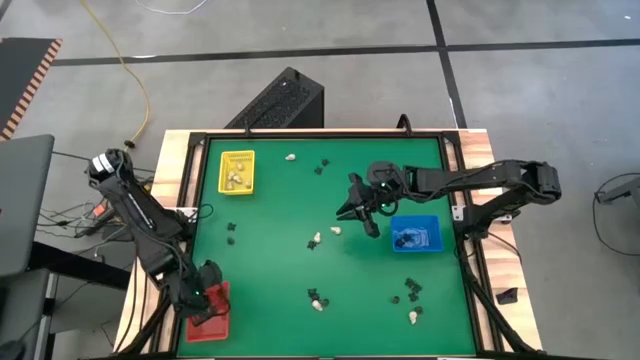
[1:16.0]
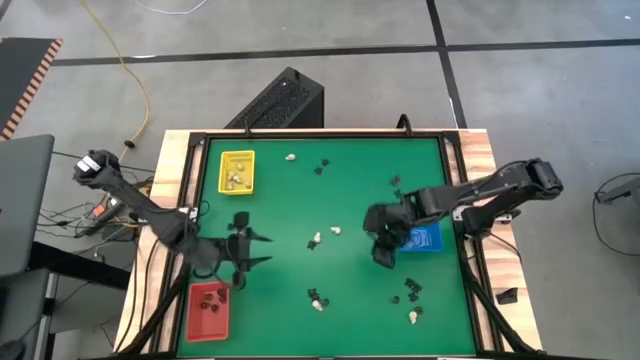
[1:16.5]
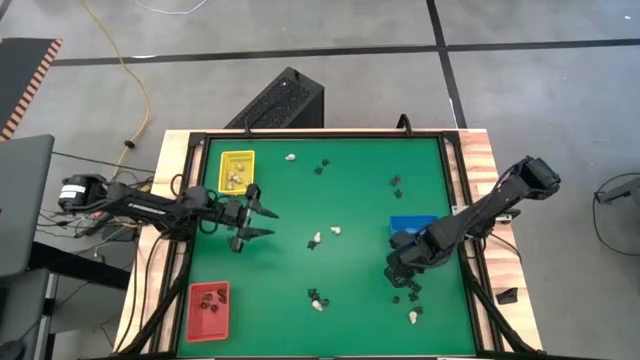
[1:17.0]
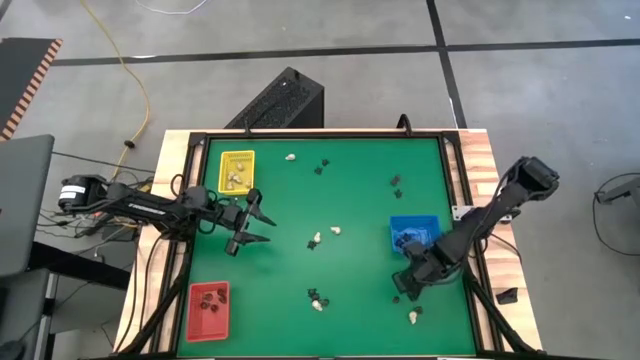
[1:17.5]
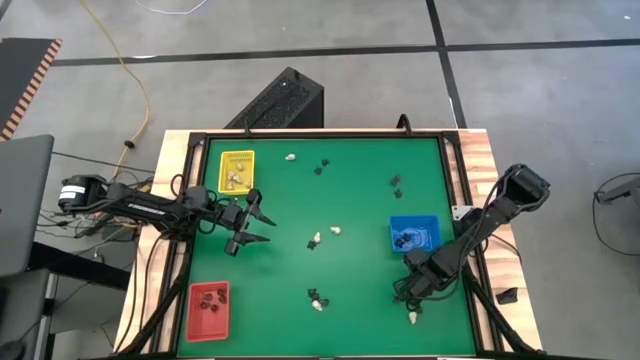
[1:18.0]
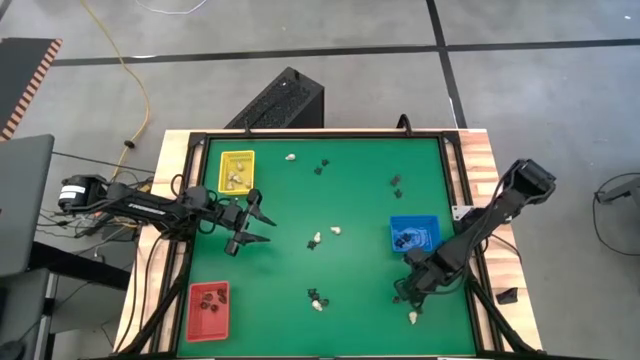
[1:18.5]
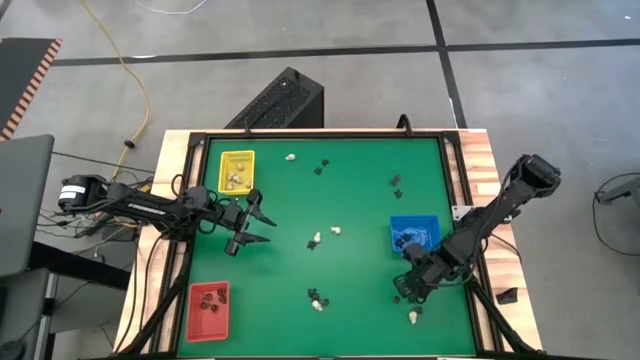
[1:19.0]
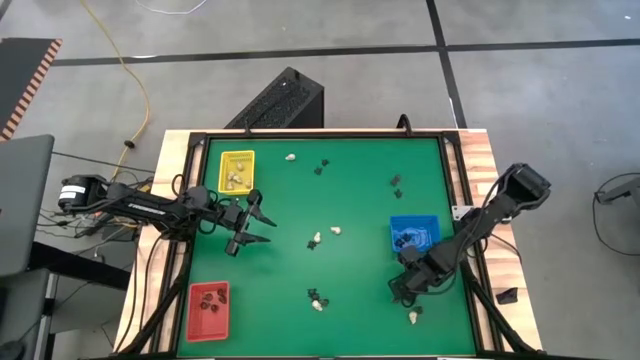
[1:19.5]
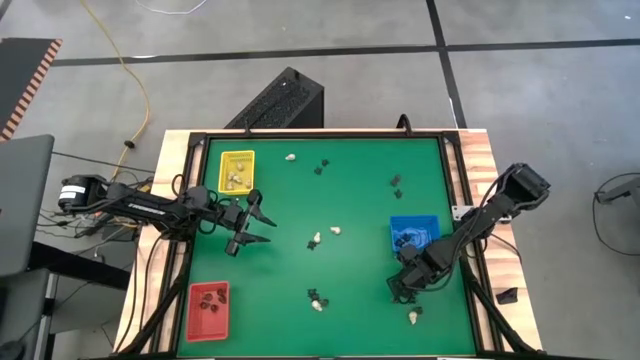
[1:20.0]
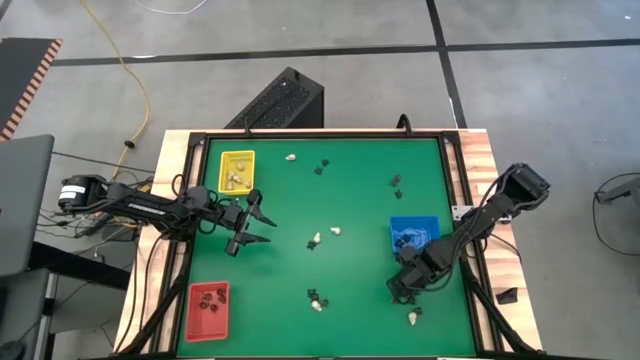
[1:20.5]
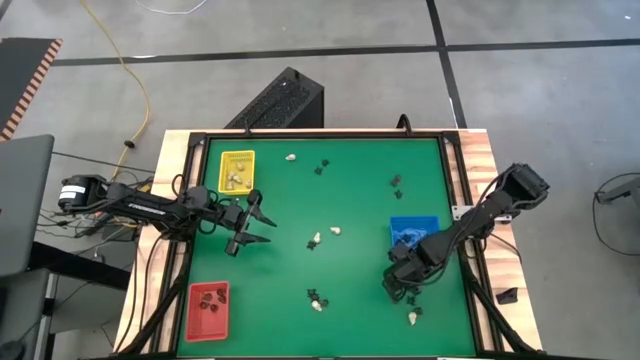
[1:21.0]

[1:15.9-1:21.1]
Task: Sort Halloween decoration
Put the black spider toy into the blue bin

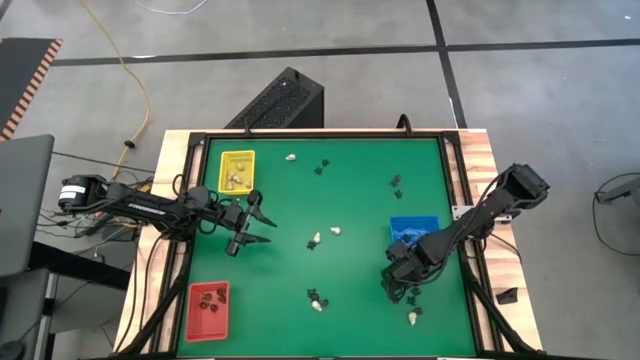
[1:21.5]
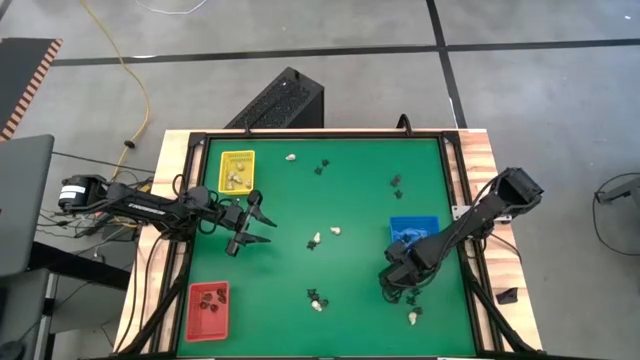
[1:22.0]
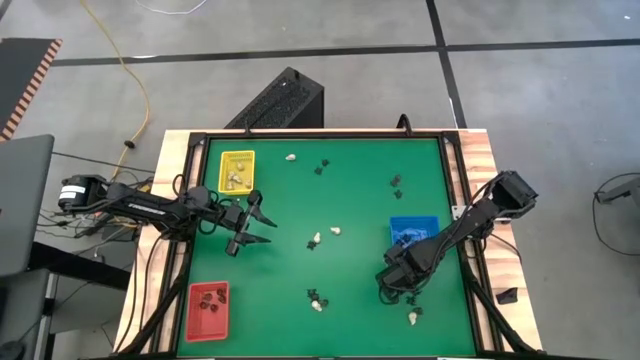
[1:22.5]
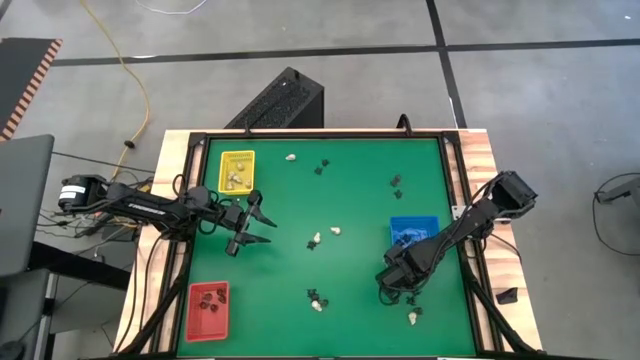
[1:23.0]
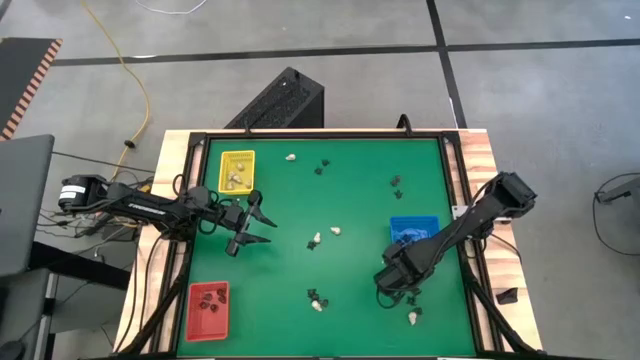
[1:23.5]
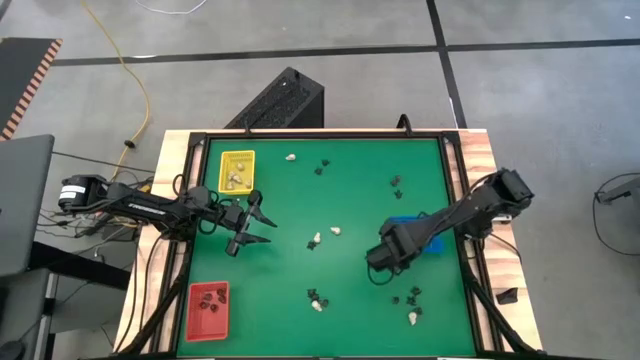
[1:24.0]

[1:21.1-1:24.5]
Put the black spider toy into the blue bin

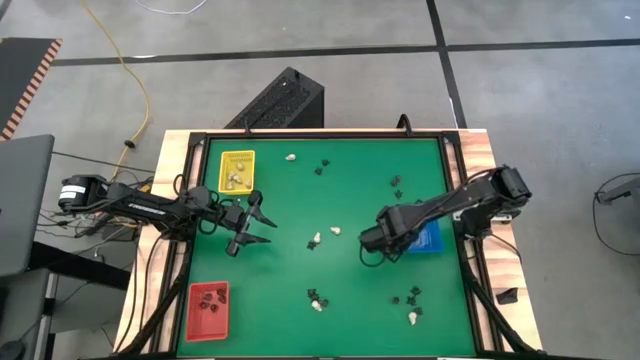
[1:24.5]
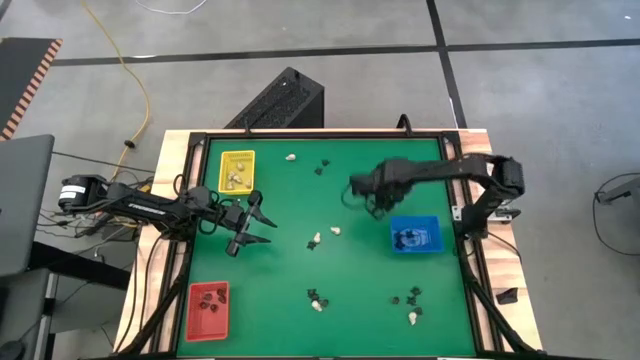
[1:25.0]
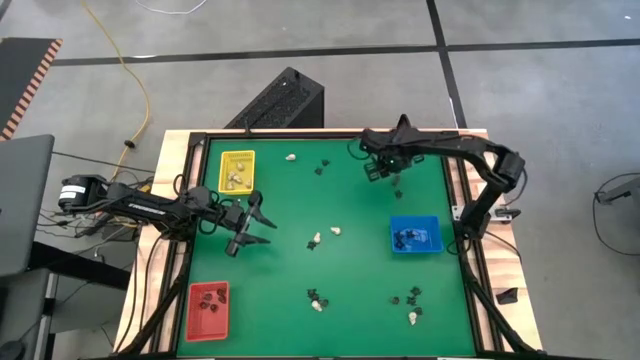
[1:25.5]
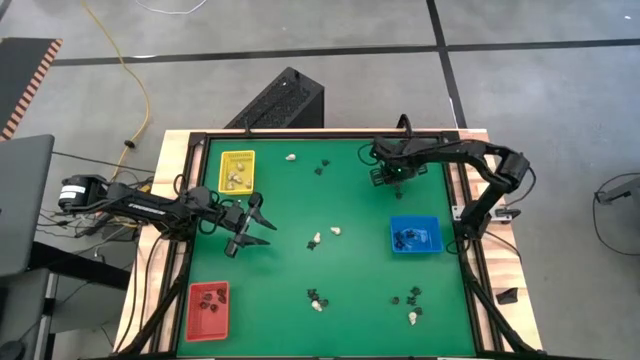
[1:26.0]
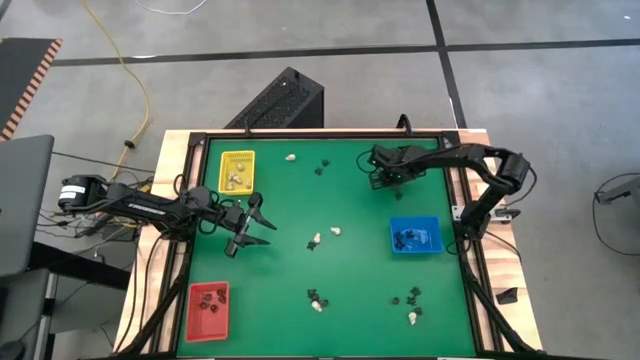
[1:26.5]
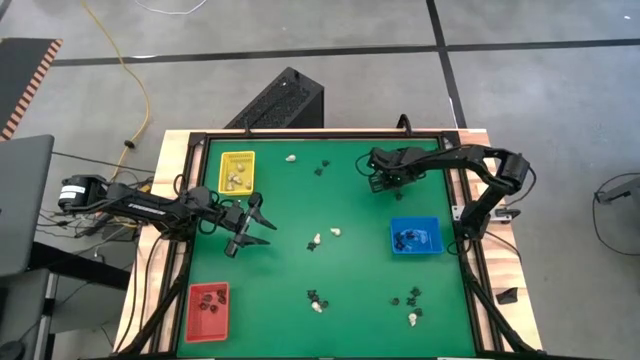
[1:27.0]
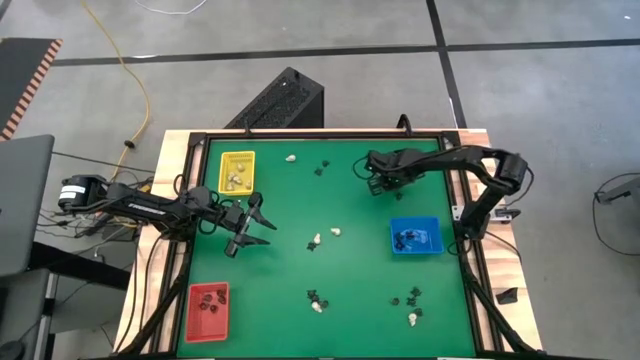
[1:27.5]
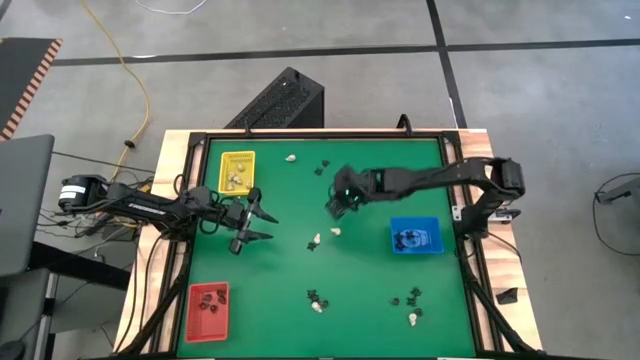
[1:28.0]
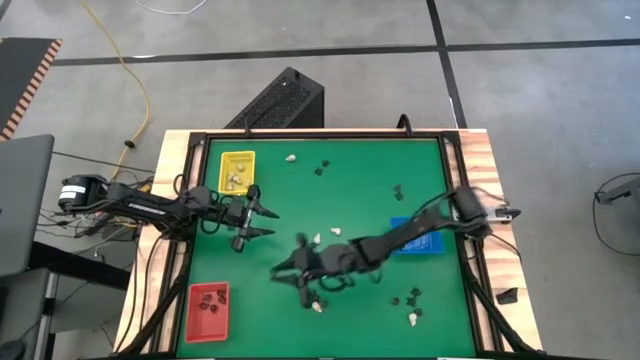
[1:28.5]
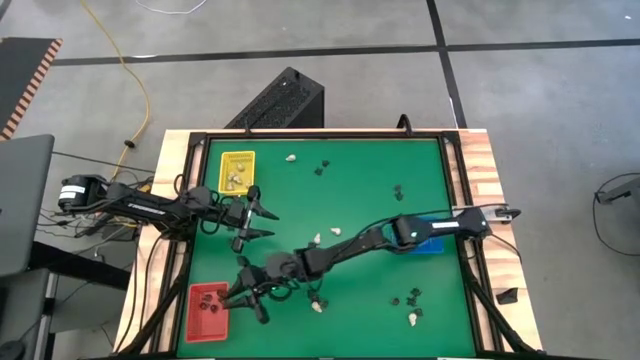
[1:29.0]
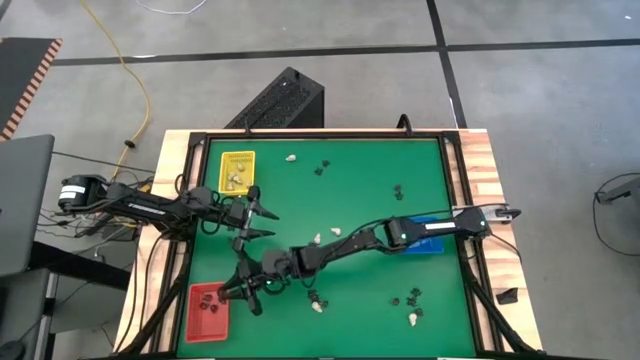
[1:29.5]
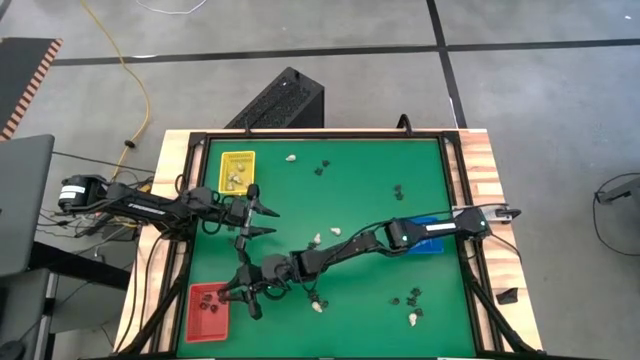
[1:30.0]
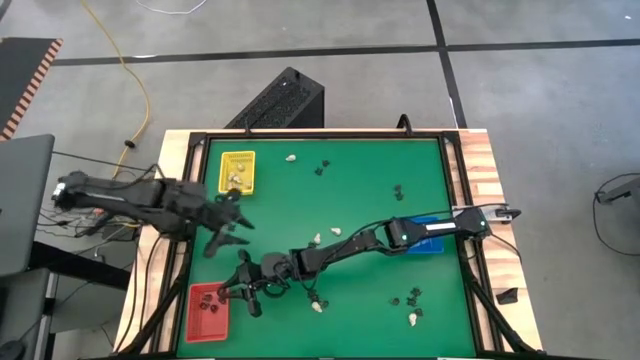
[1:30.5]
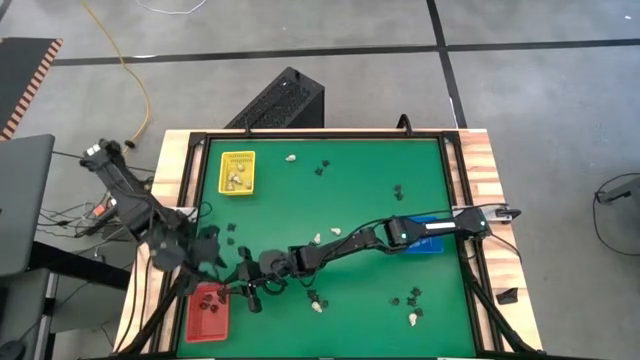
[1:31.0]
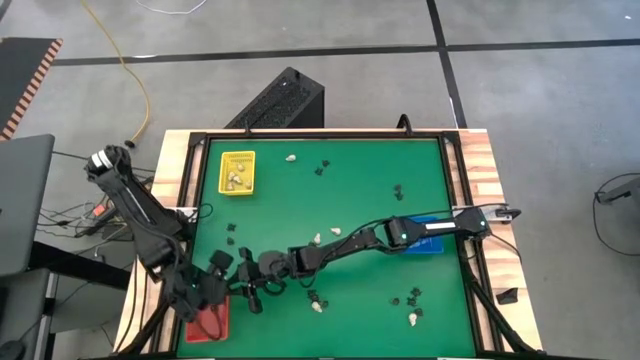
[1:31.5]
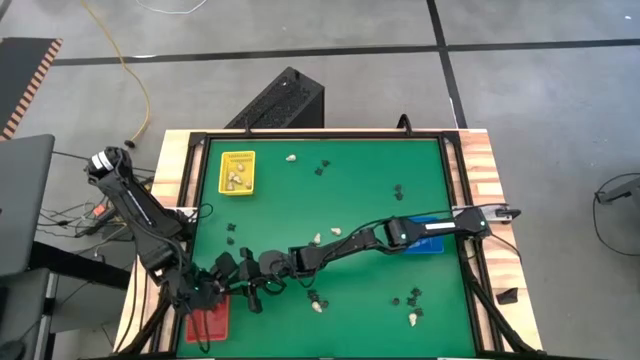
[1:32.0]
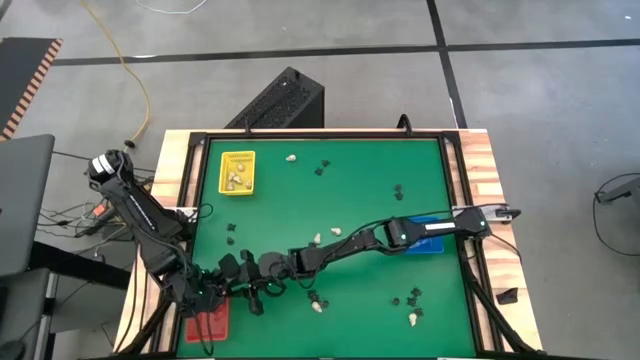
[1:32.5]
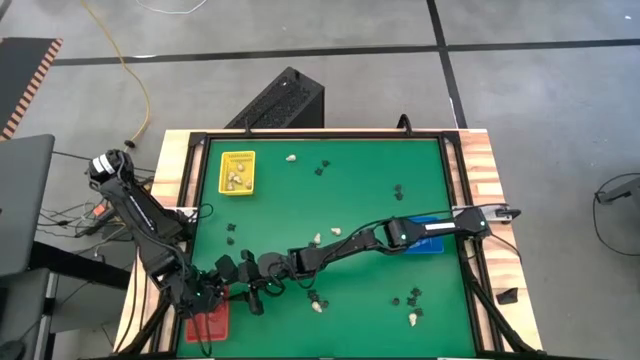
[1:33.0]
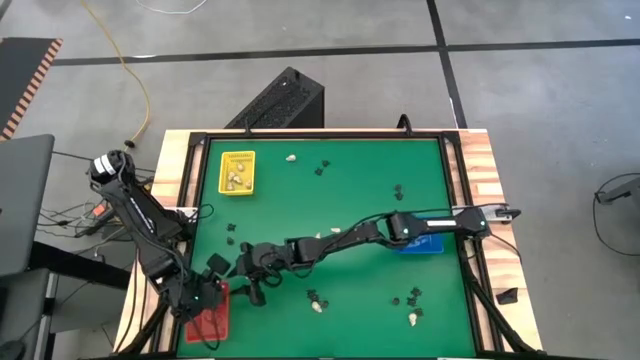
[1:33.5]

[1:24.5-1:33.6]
Put the black skull toy into the red bin

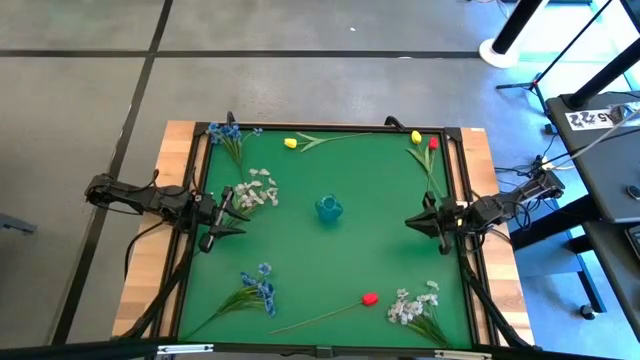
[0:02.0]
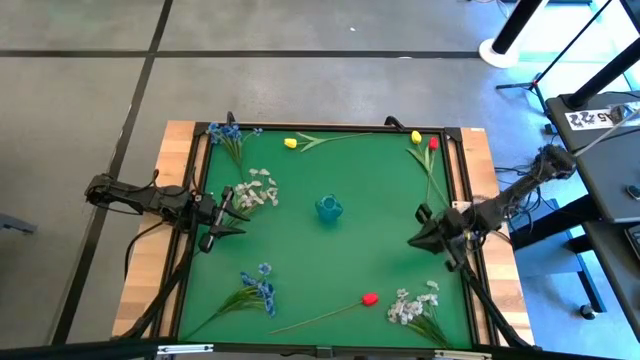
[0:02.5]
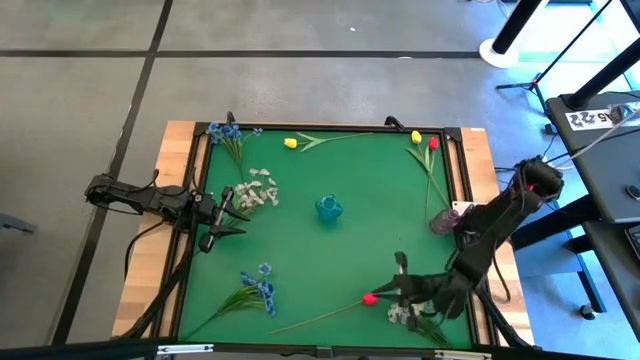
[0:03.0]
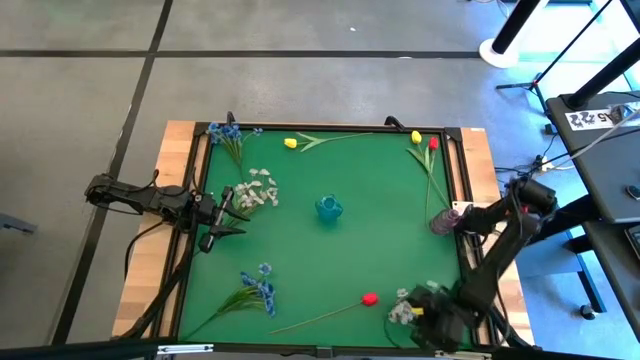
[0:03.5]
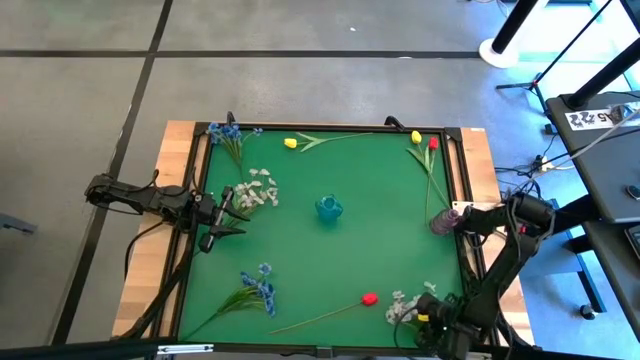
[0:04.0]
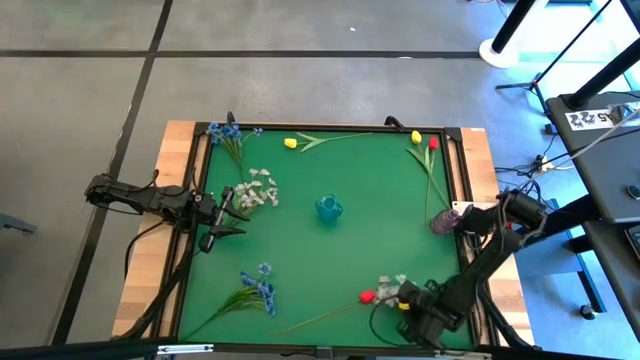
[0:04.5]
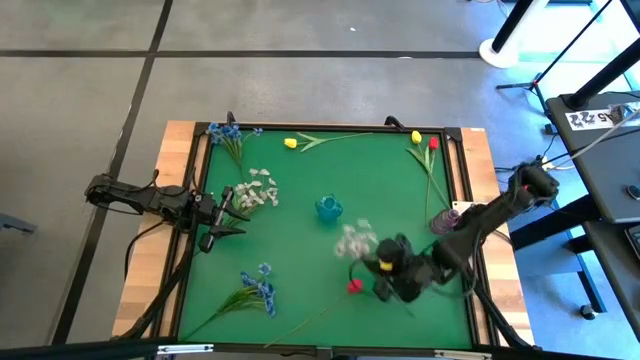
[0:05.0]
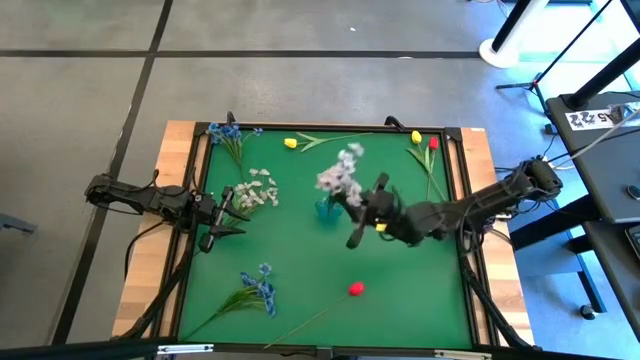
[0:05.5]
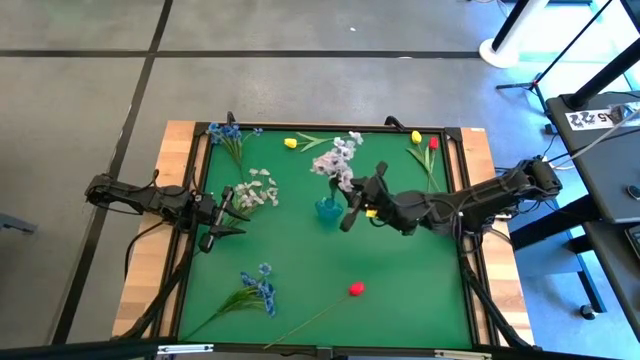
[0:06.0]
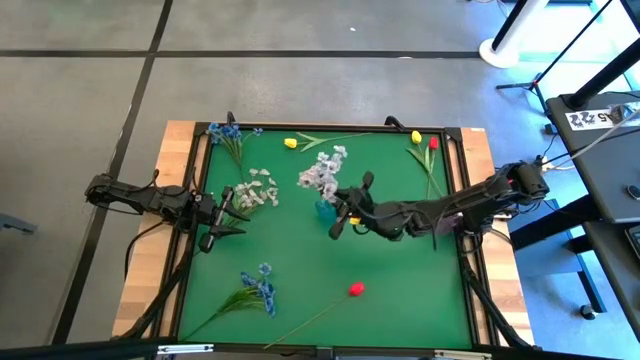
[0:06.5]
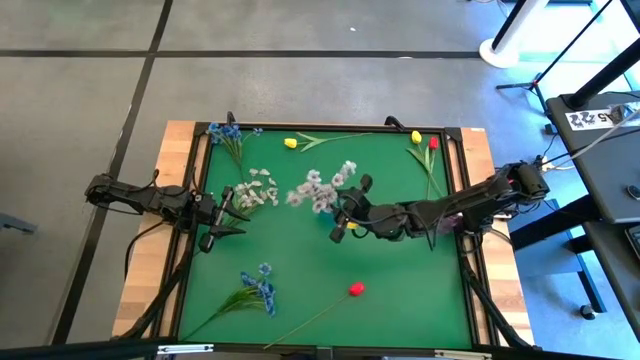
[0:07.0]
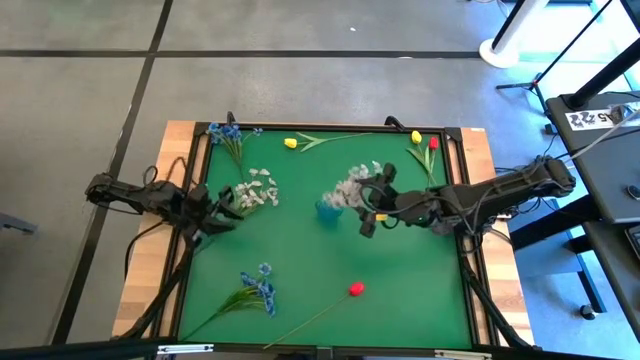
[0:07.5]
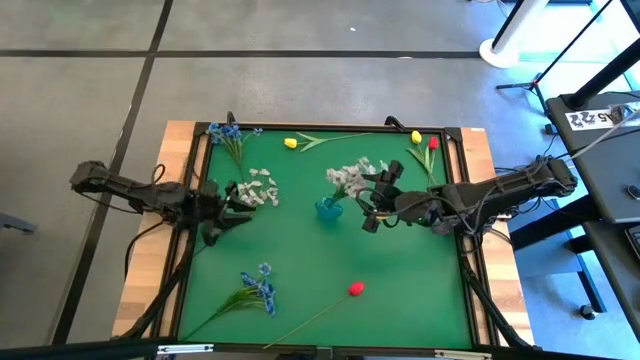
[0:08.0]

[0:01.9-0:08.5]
Task: Sort flowers into vase by color
Put the bottom white flowers into the blue vase
